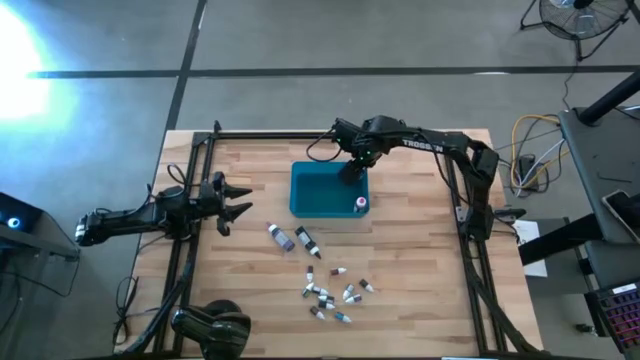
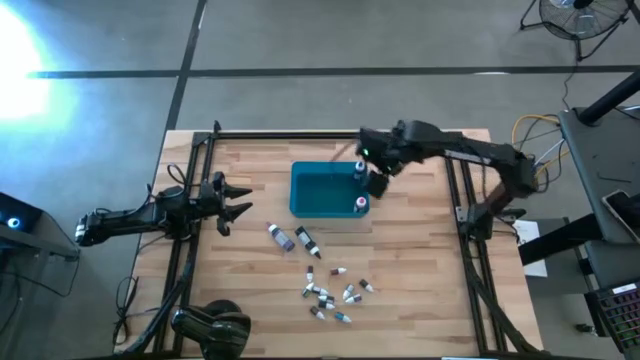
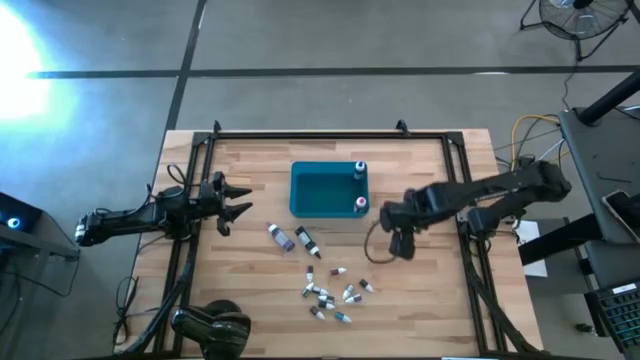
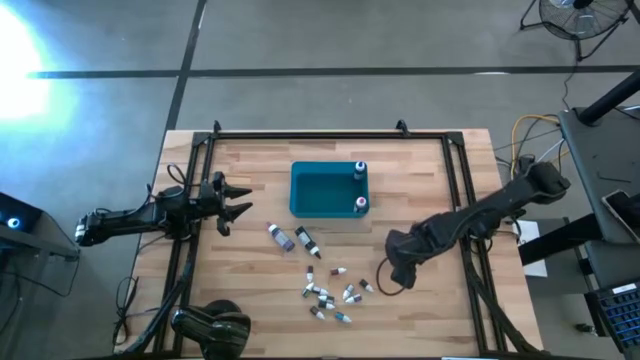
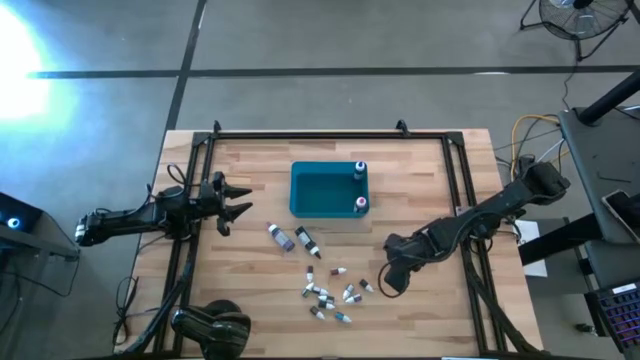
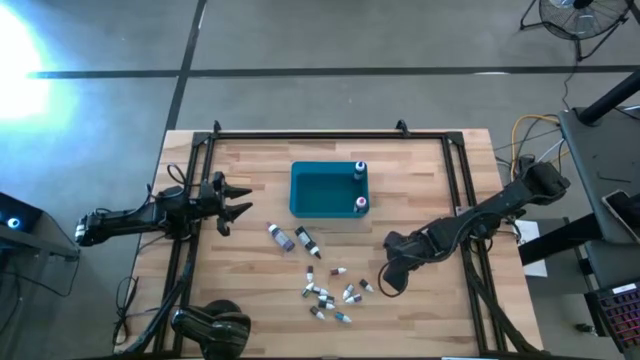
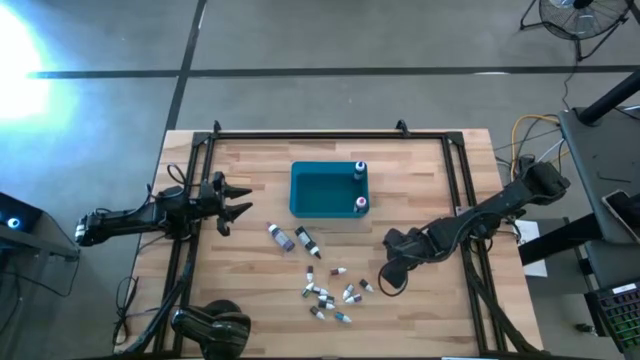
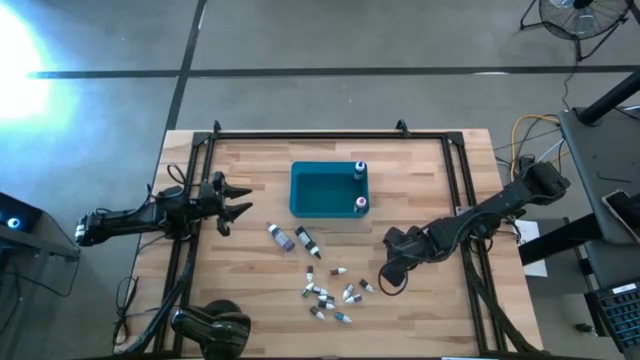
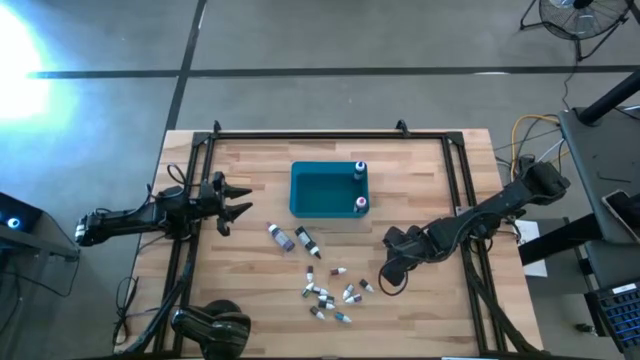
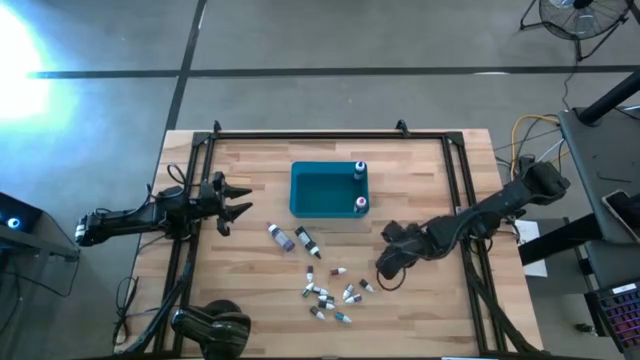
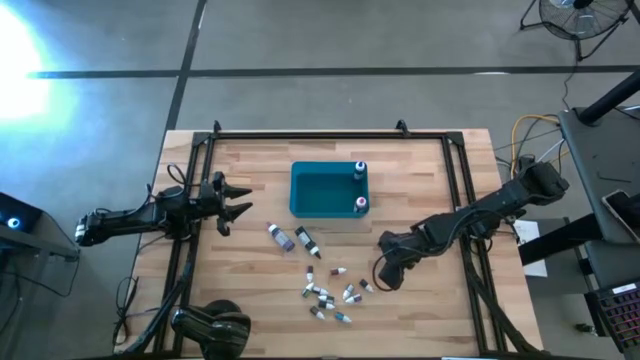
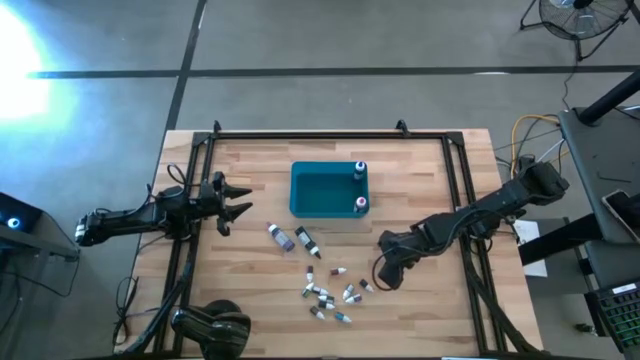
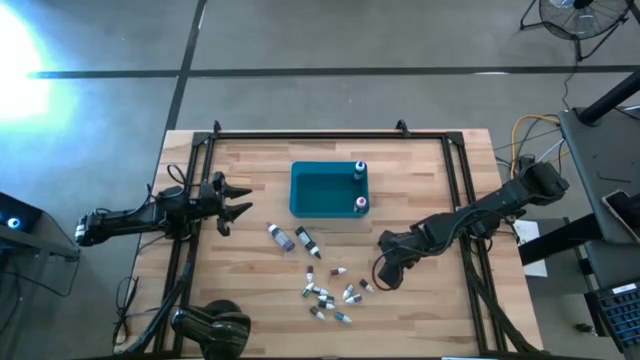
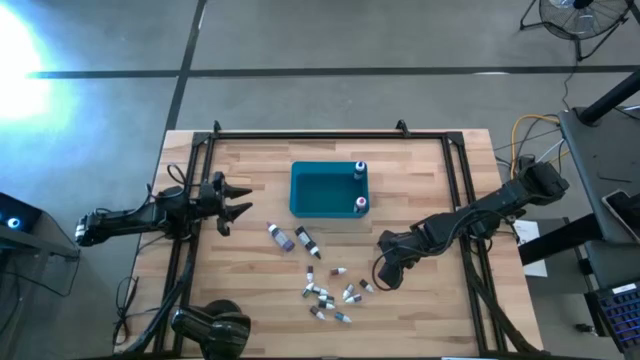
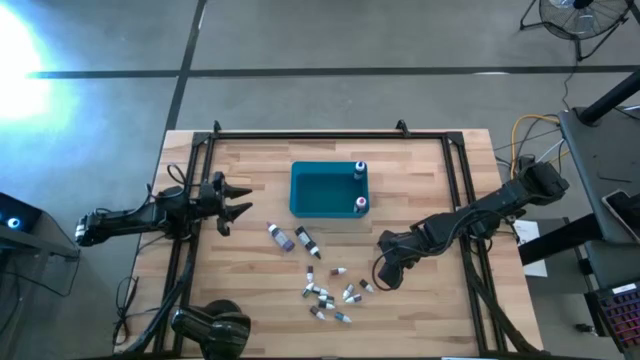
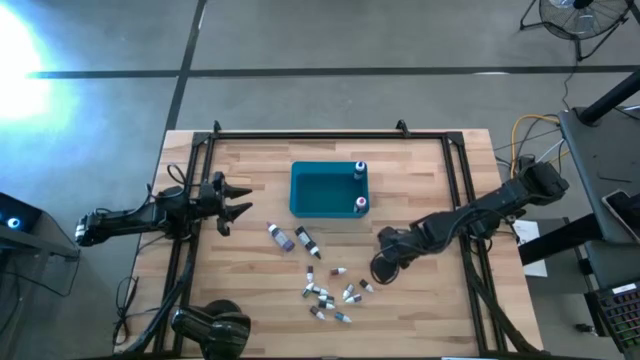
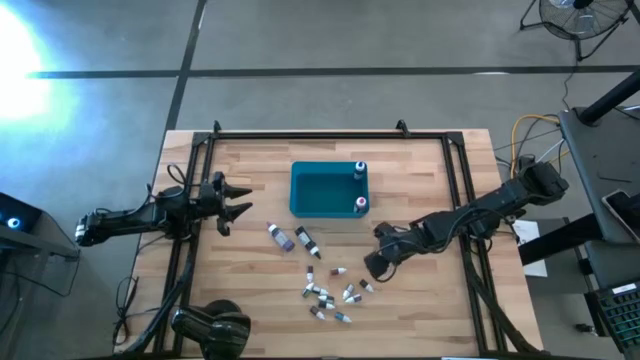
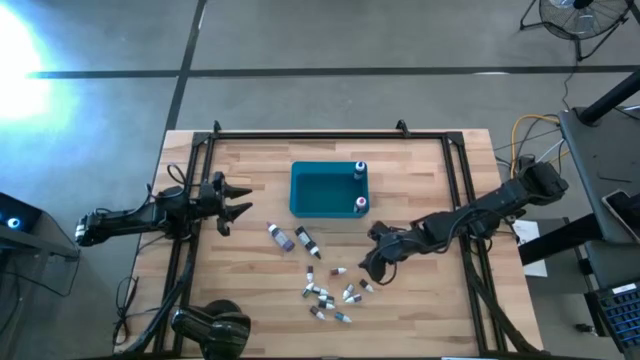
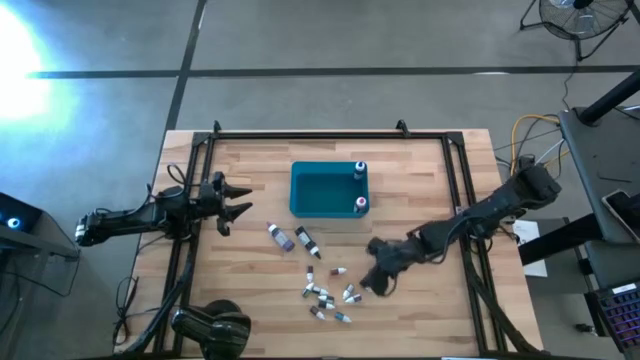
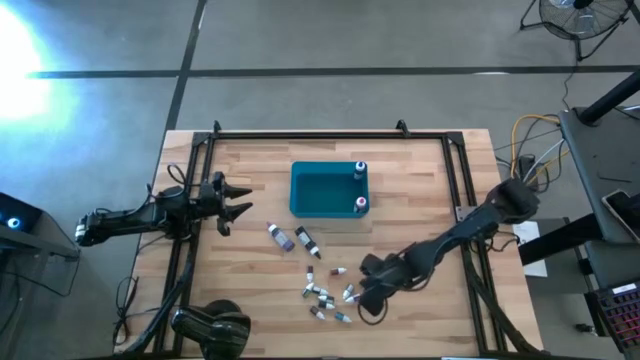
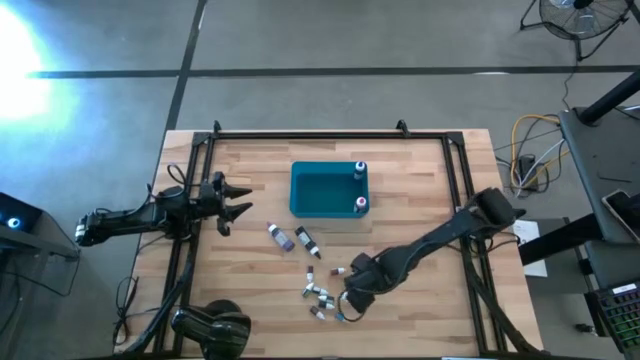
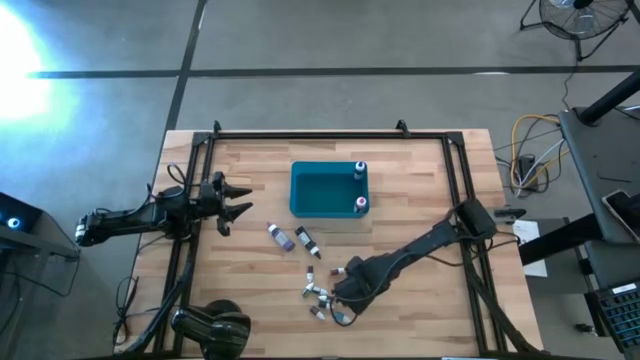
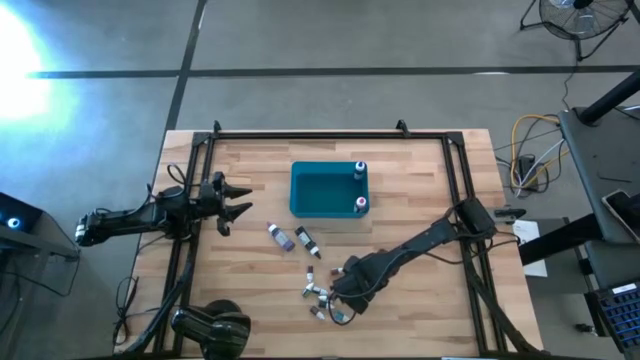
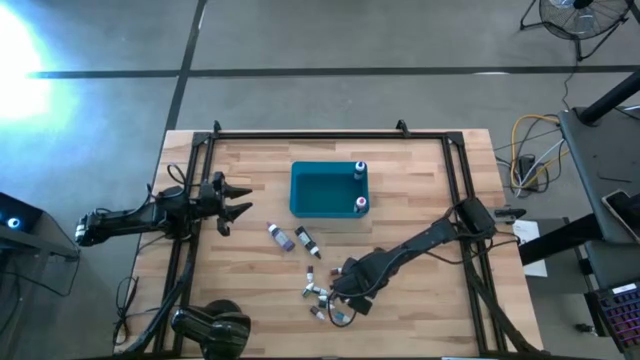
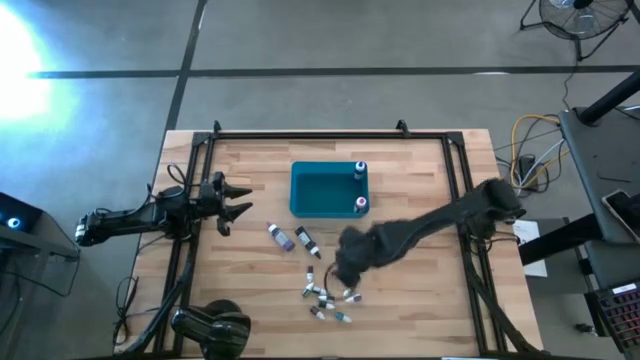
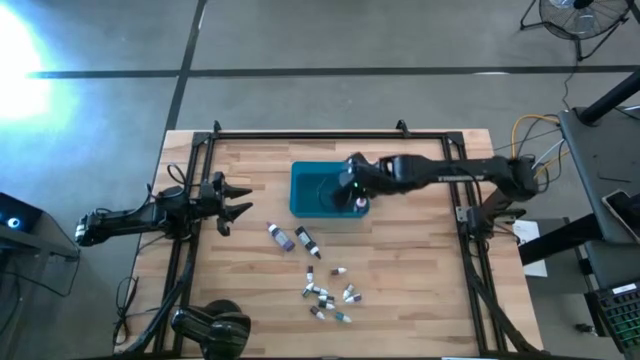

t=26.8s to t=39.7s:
Task: Pick & Place food coloring
Put the black food coloring bottle into the blue bin

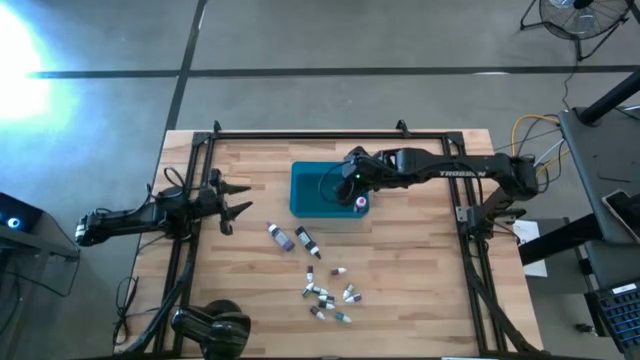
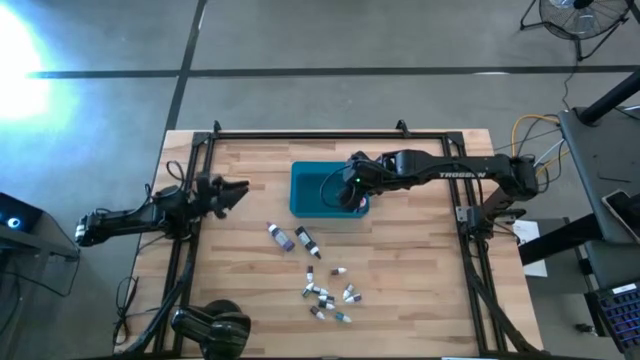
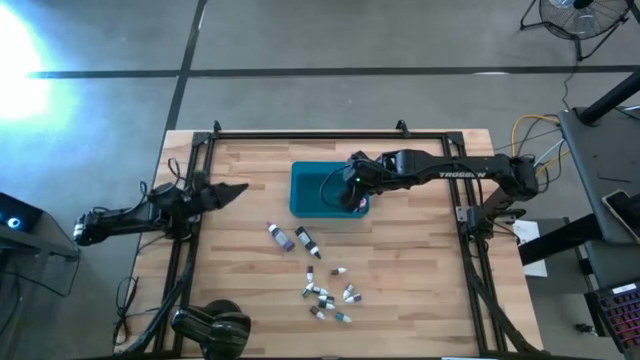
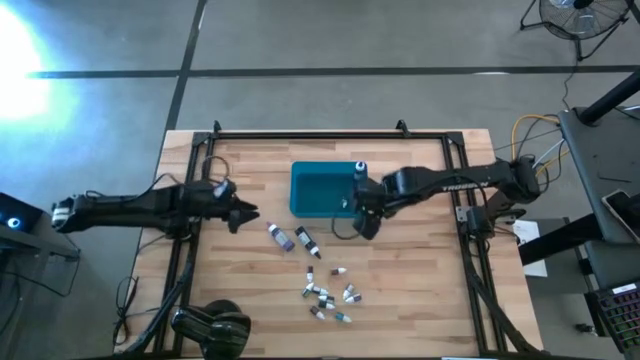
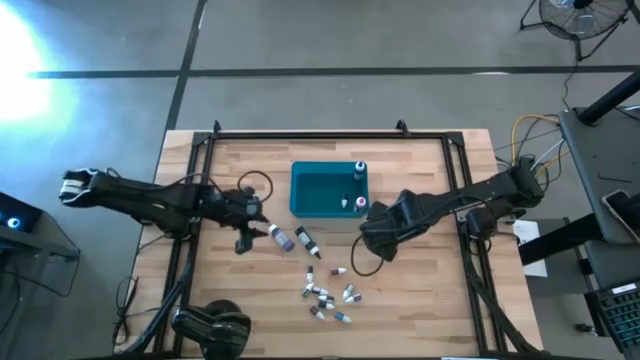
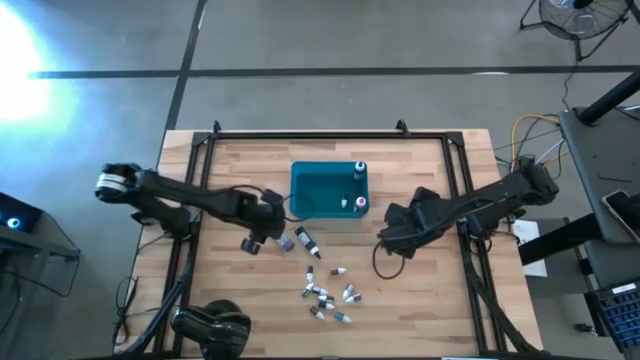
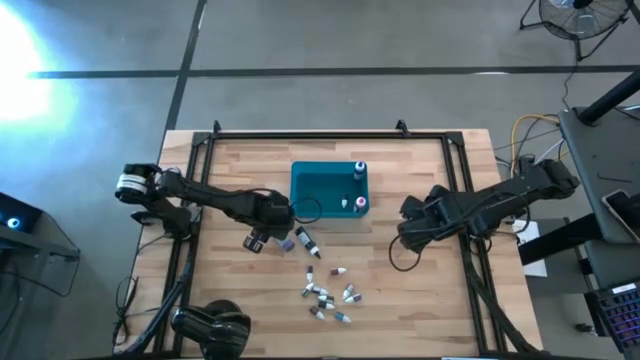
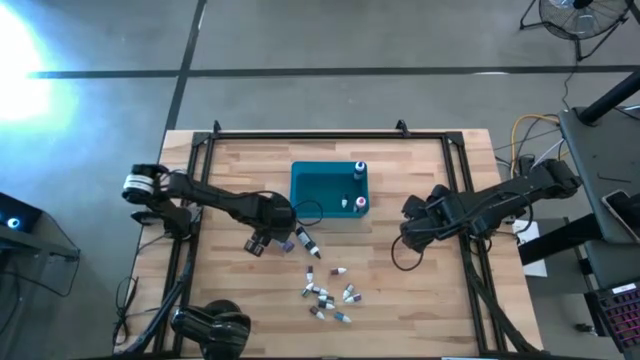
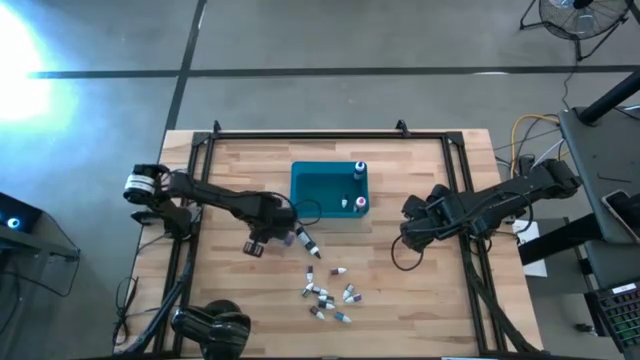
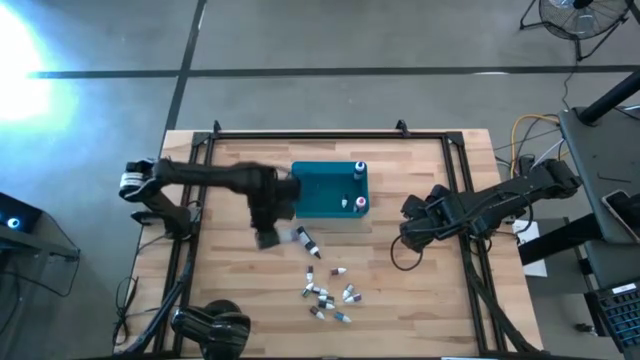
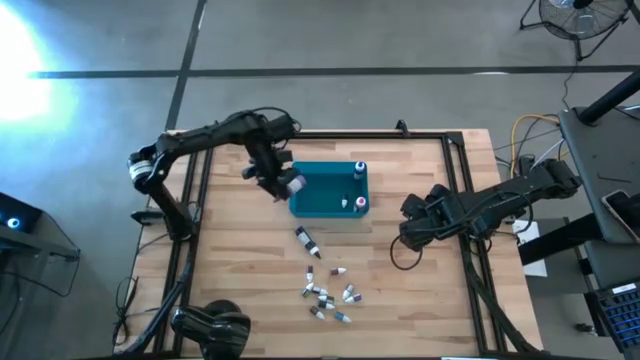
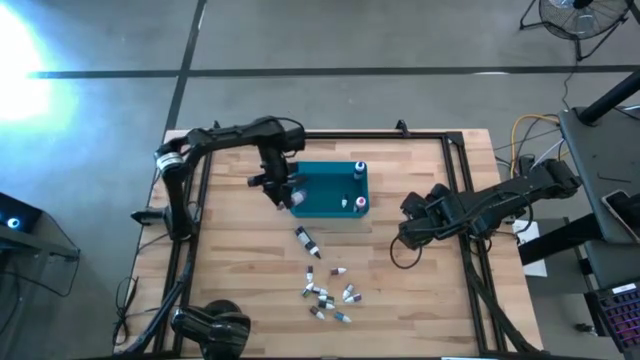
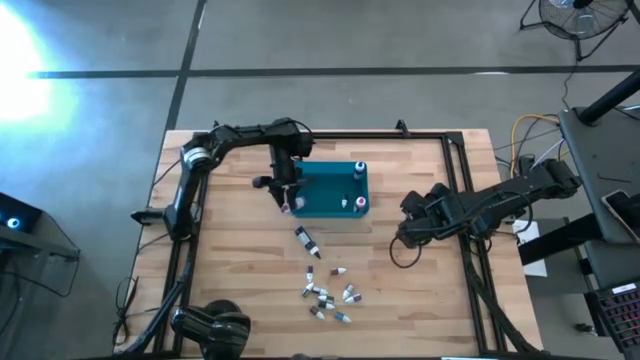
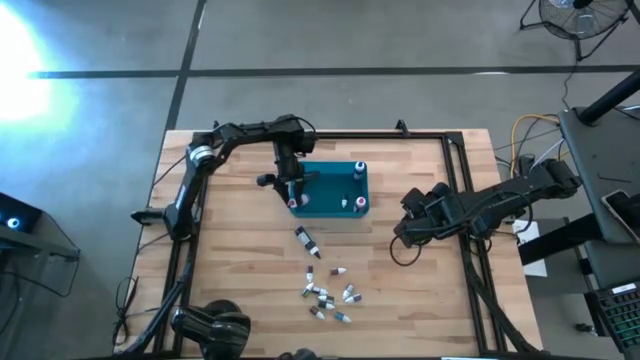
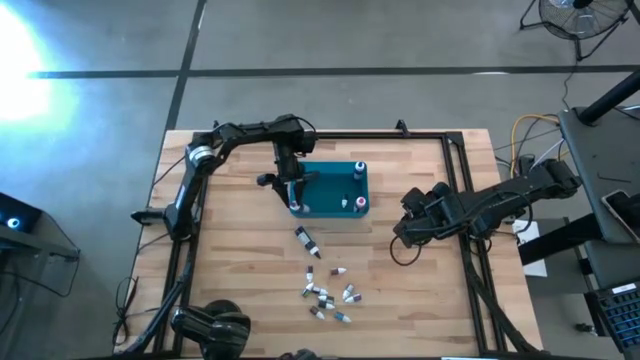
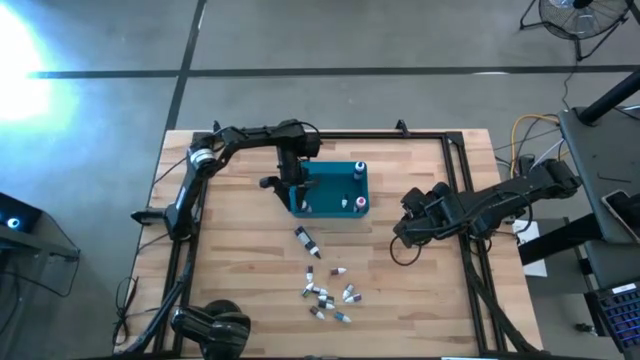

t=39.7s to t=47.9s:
Put the violet food coloring bottle into the blue bin
